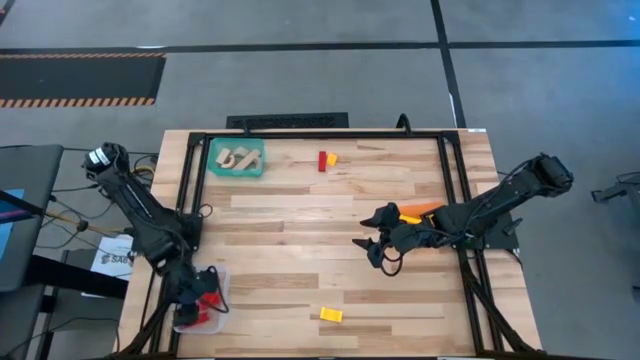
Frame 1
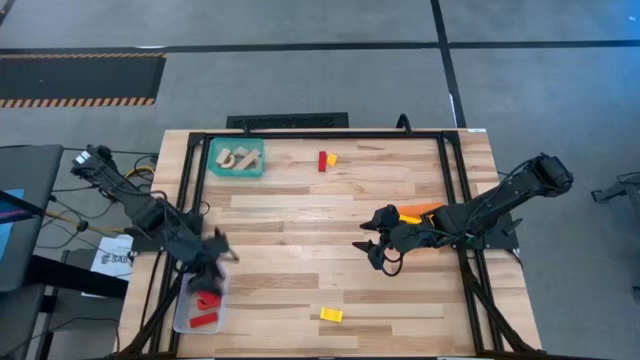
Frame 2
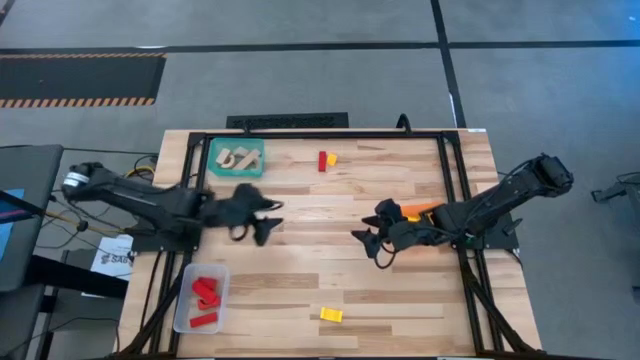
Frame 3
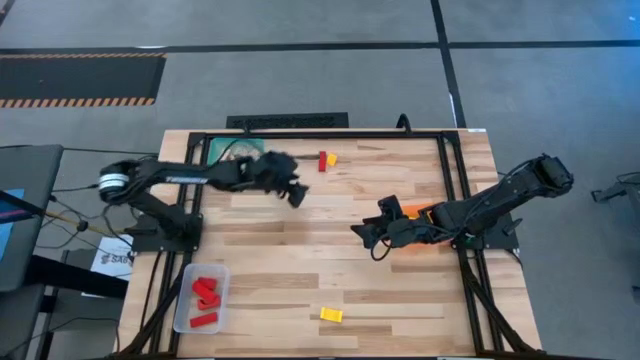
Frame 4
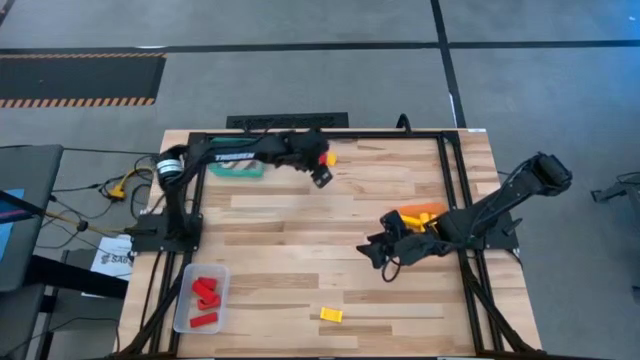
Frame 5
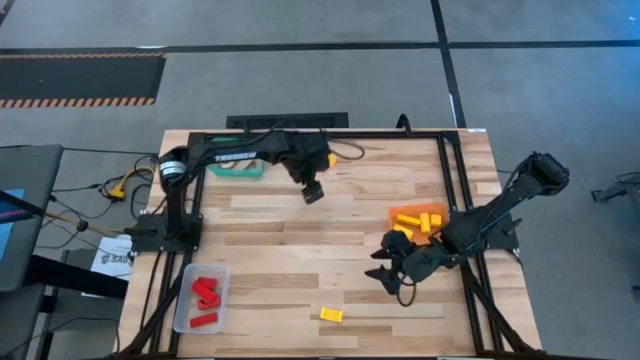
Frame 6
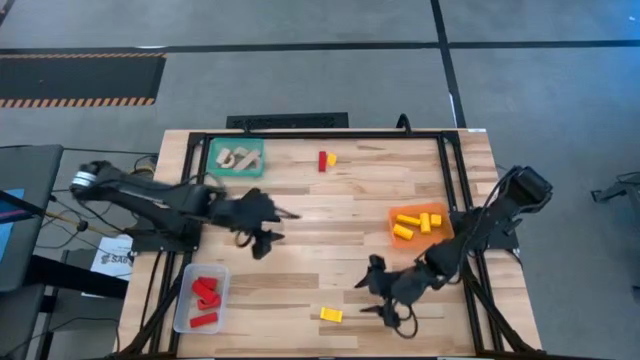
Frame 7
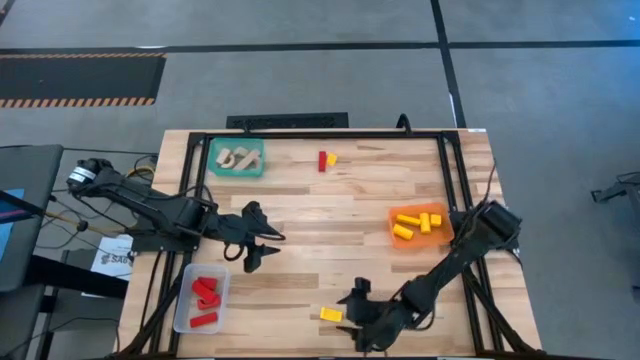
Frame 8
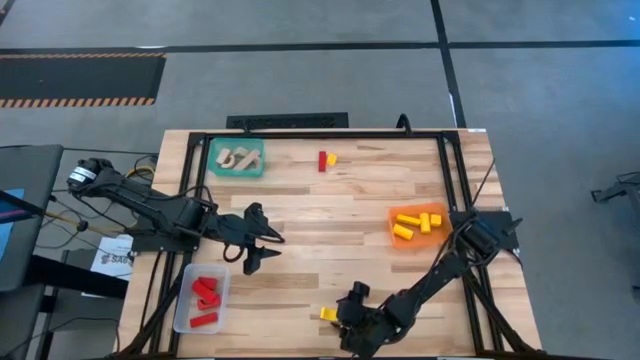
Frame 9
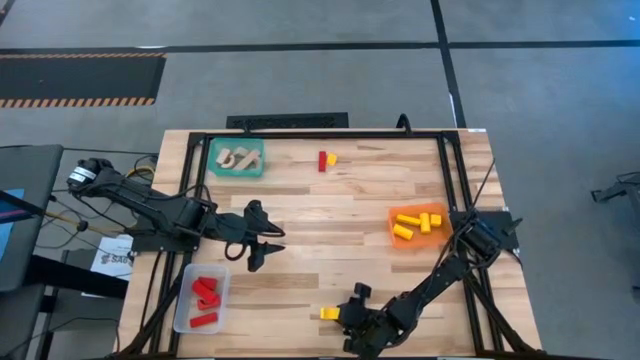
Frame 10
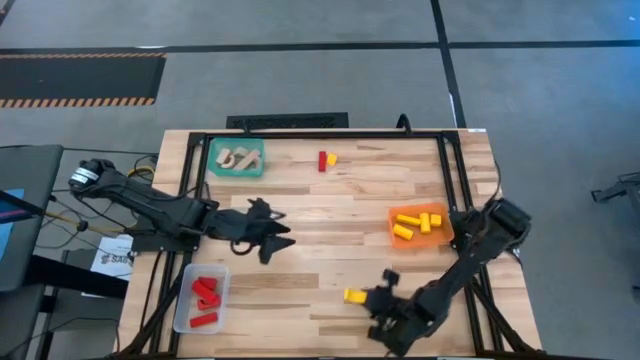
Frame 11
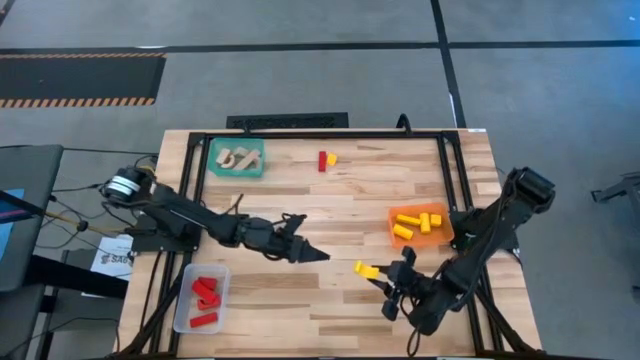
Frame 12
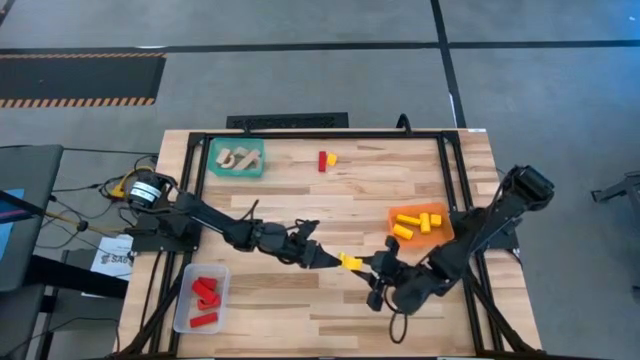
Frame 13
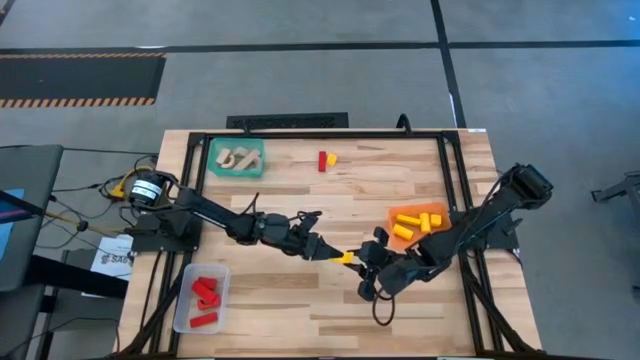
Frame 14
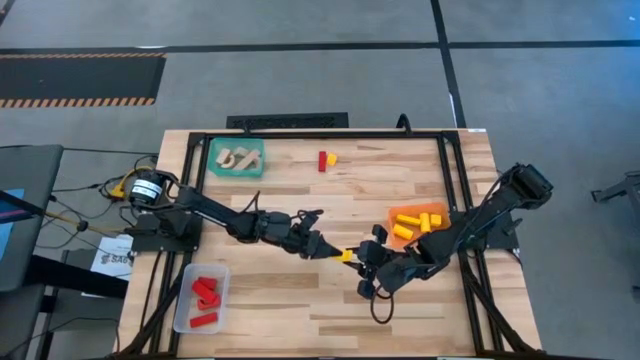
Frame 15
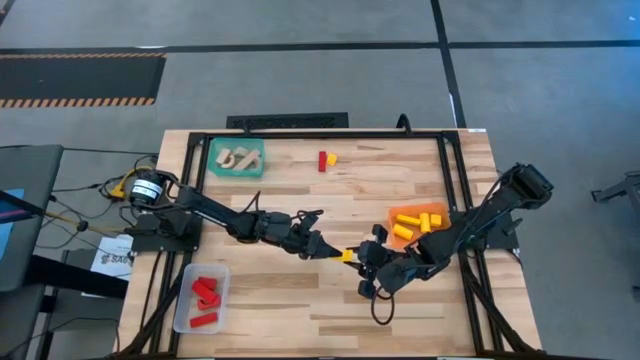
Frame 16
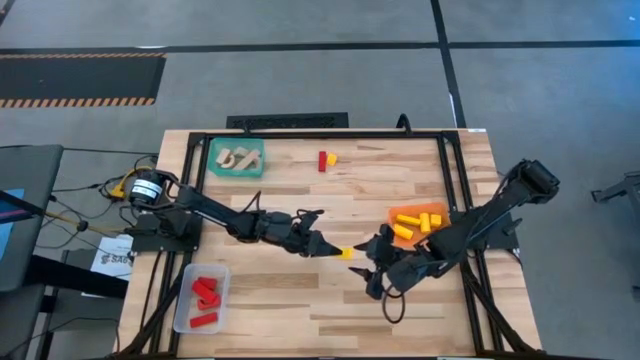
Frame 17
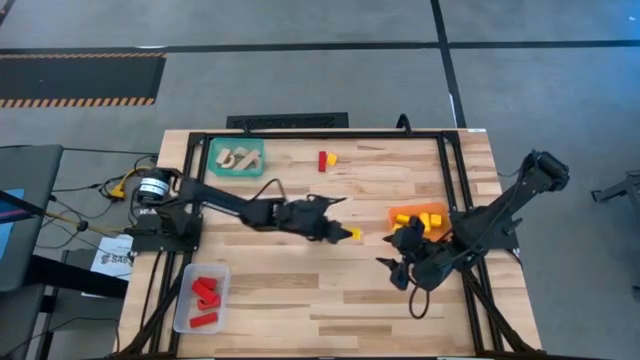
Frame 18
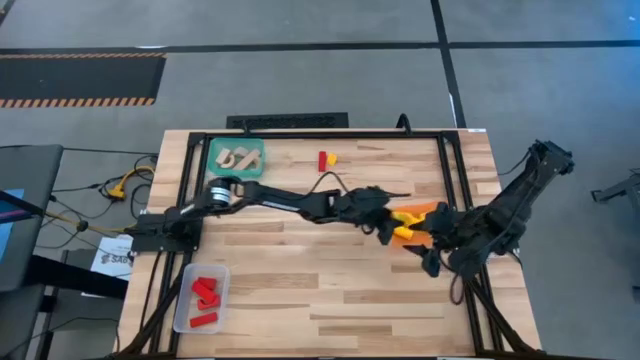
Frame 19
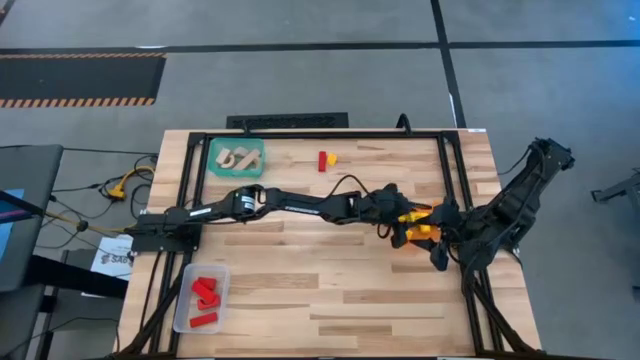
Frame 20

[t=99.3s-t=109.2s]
Task: Sort & place blocks by color
Put the yellow block into the orange bin

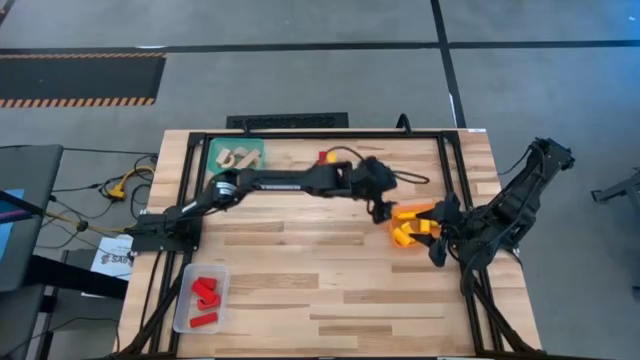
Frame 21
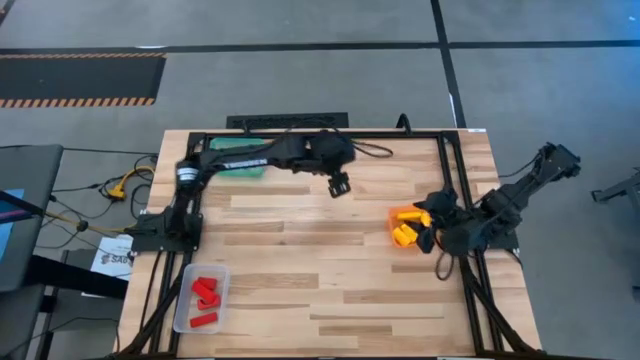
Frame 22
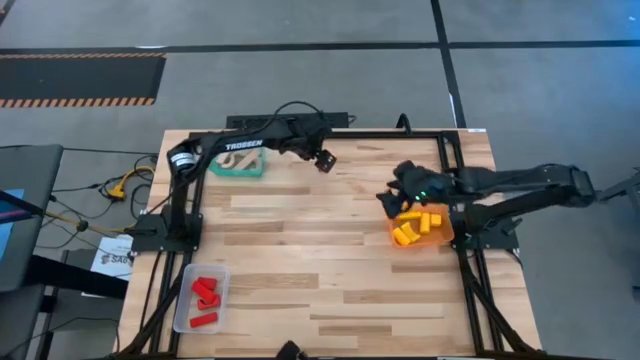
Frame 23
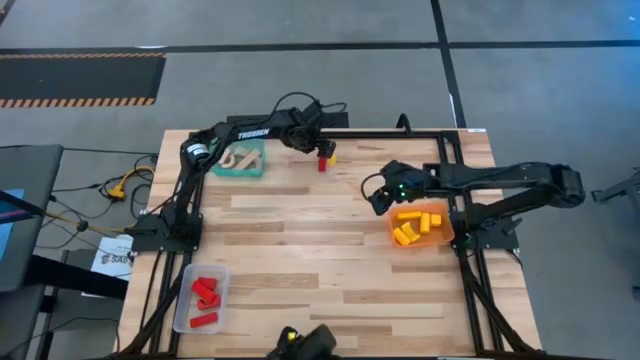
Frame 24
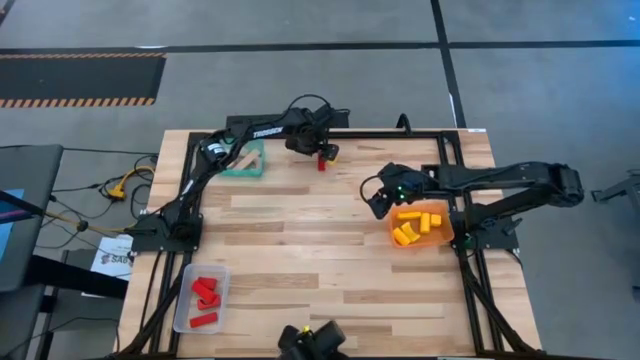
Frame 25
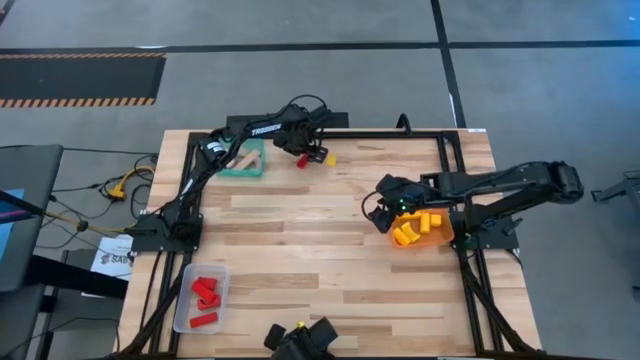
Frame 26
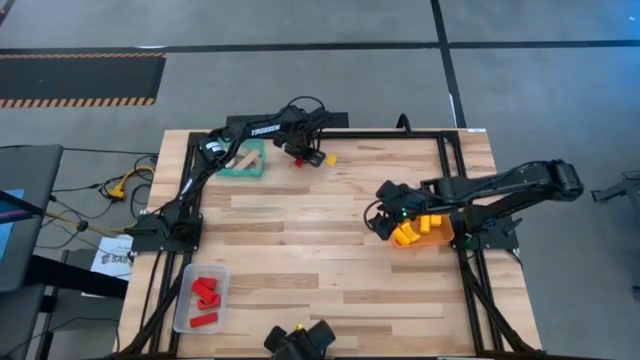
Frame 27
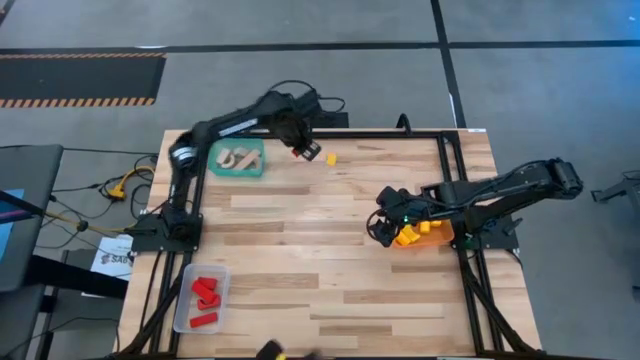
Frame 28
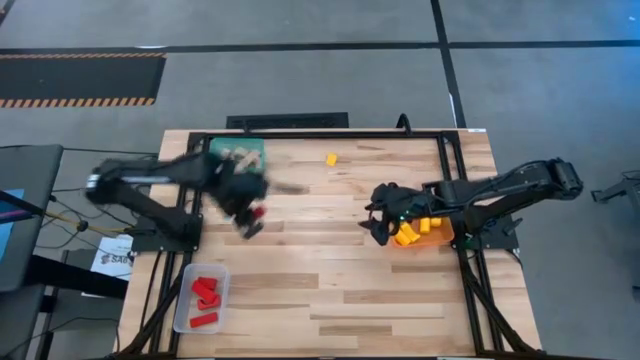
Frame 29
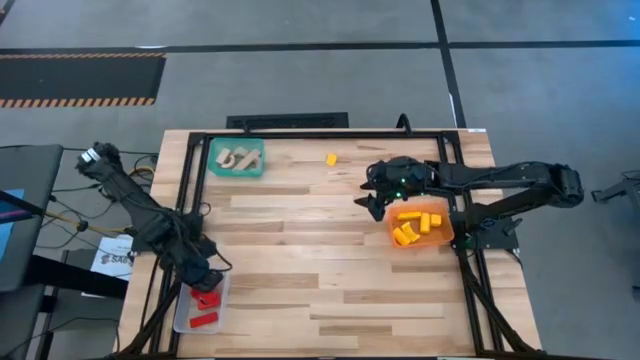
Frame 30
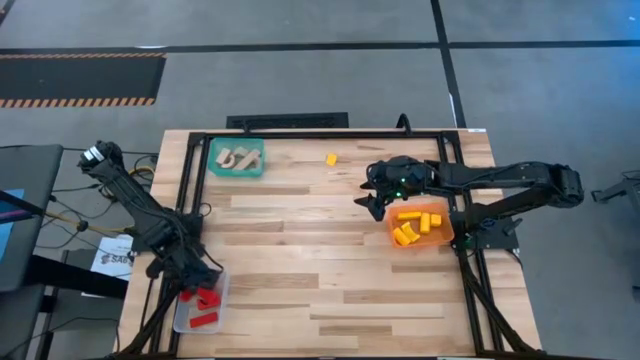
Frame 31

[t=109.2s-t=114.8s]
Put the red block into the transparent bin

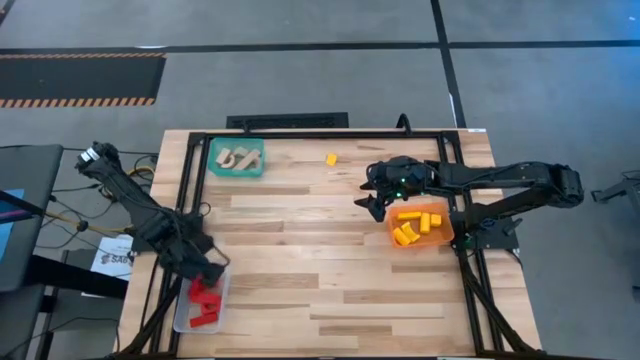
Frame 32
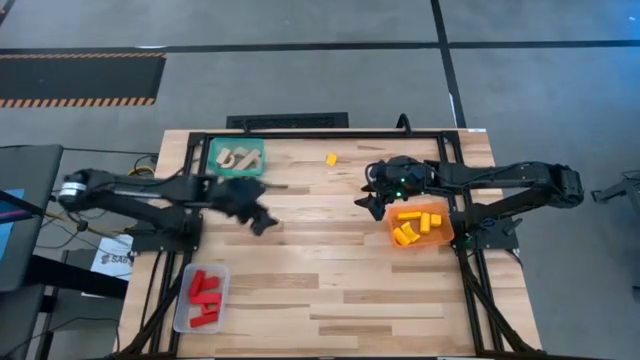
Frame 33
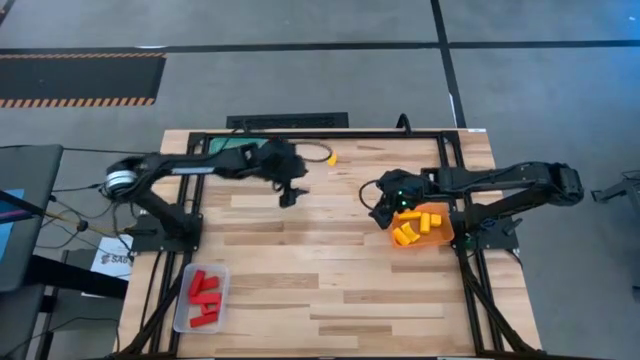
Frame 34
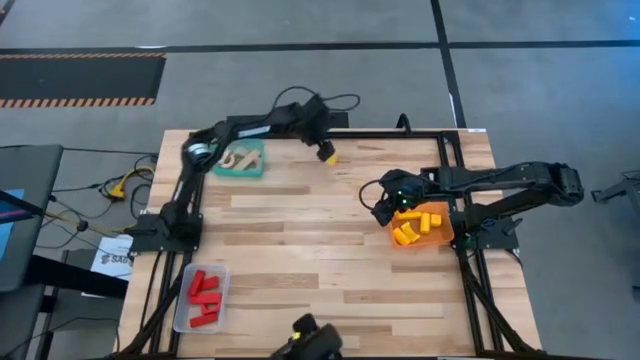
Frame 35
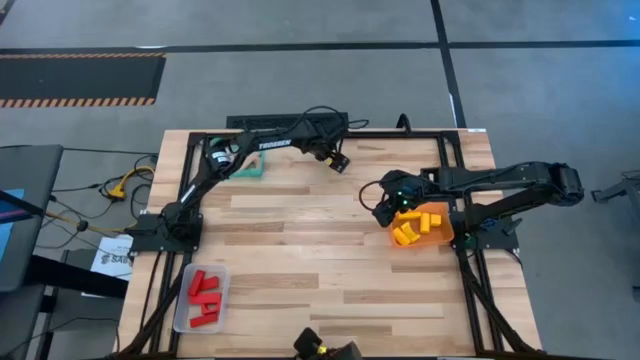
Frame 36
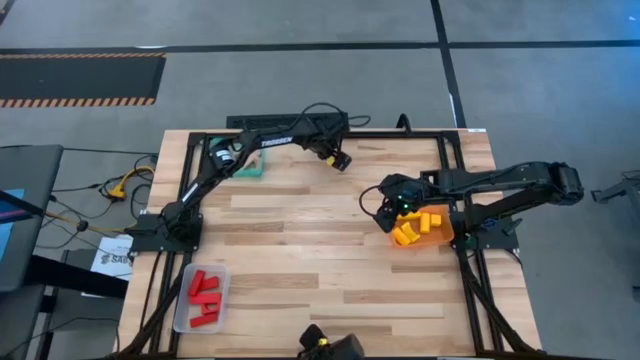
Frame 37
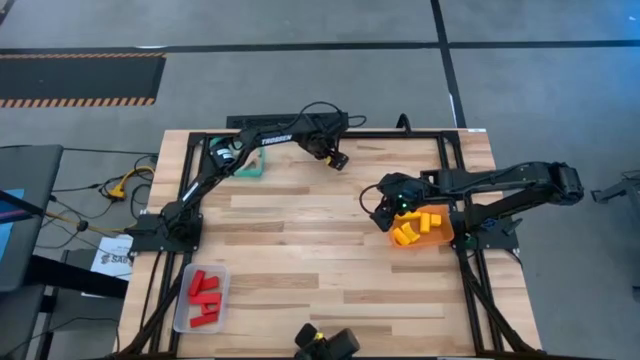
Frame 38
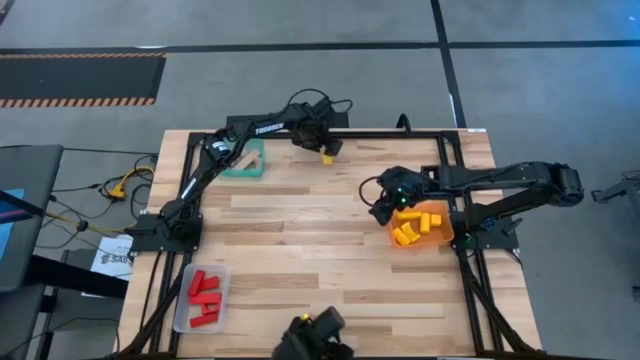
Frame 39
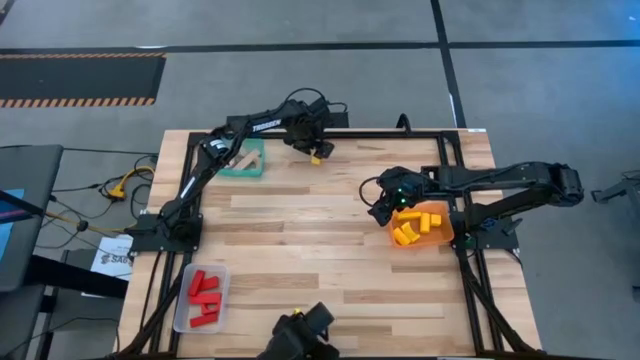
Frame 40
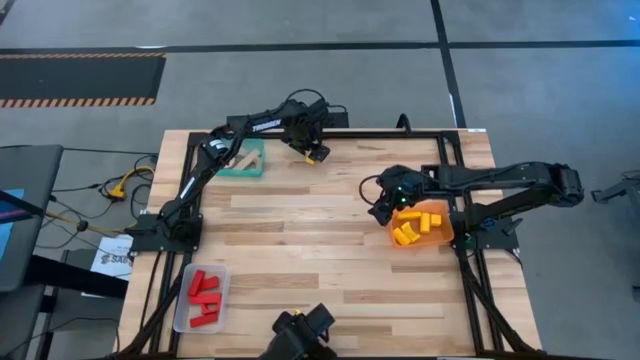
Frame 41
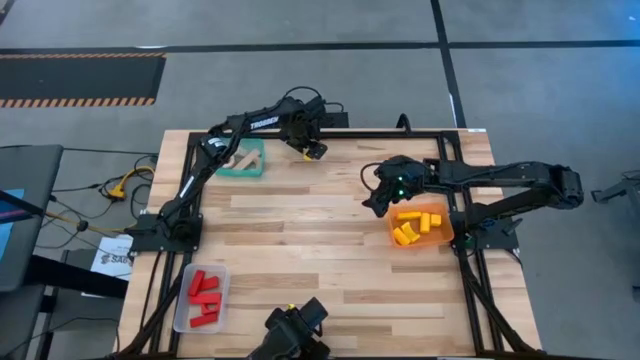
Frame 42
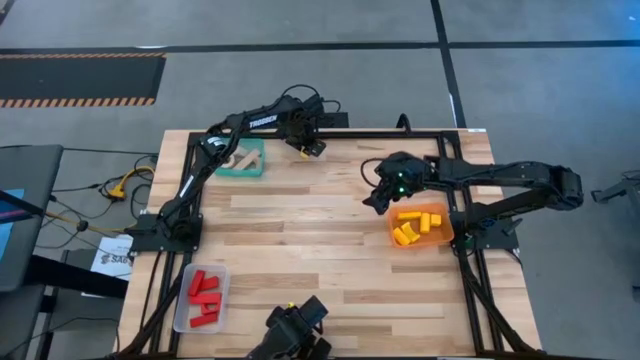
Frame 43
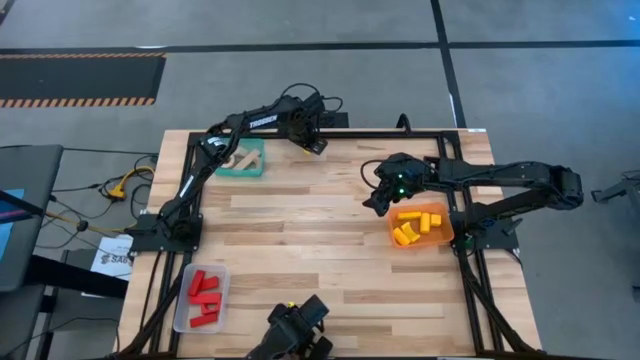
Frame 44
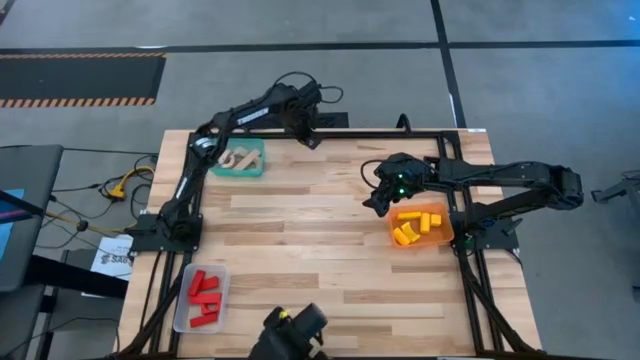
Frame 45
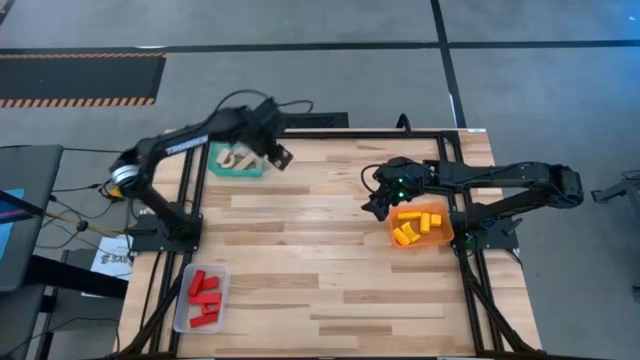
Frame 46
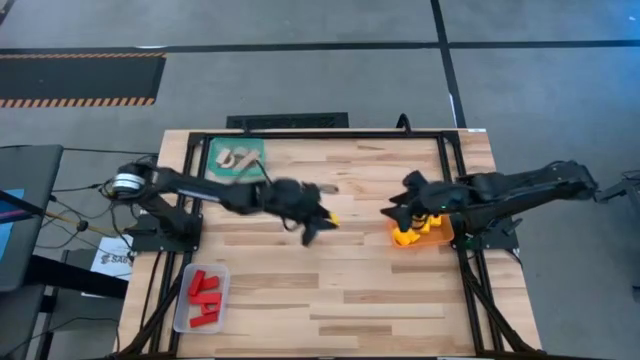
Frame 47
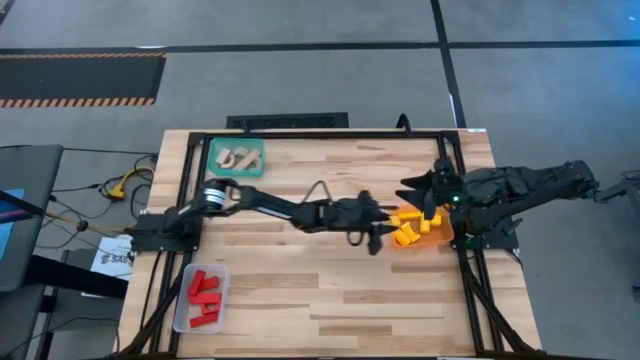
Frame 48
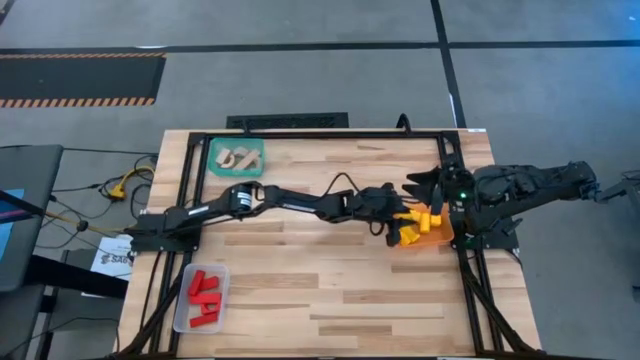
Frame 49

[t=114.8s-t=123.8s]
Put the yellow block into the orange bin
